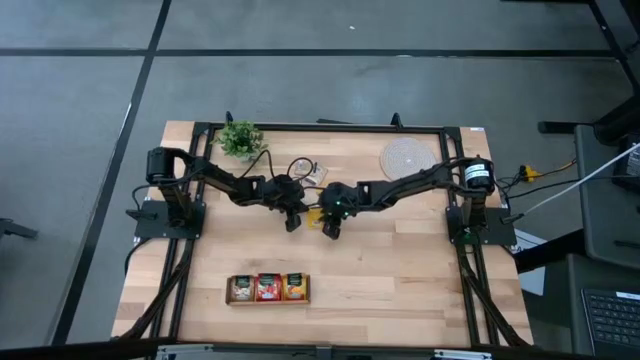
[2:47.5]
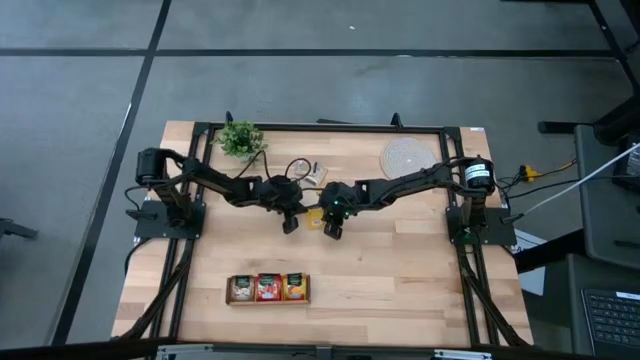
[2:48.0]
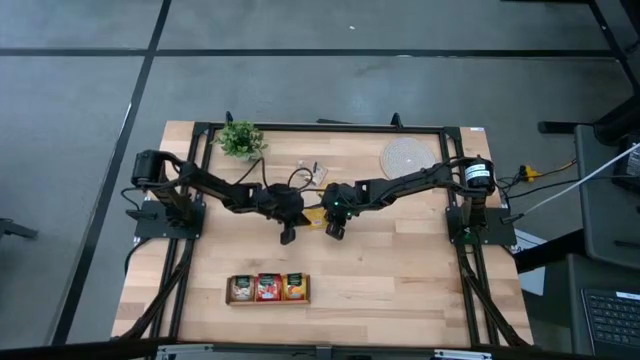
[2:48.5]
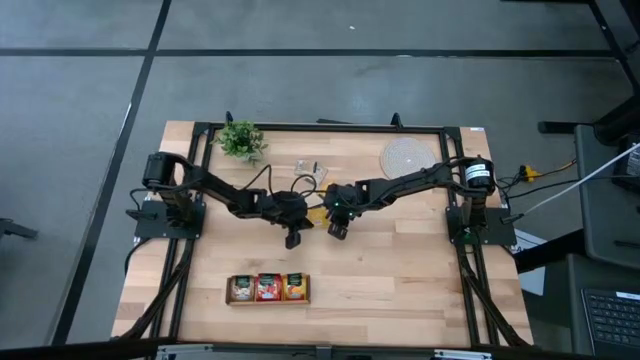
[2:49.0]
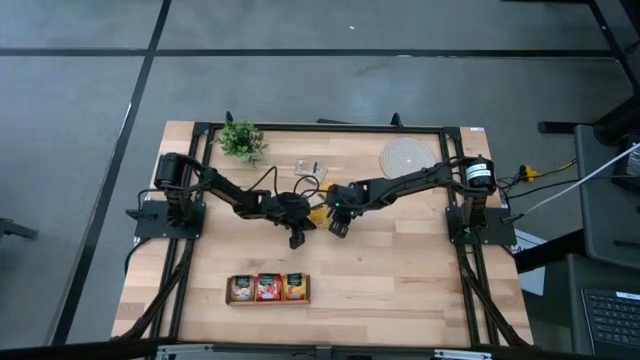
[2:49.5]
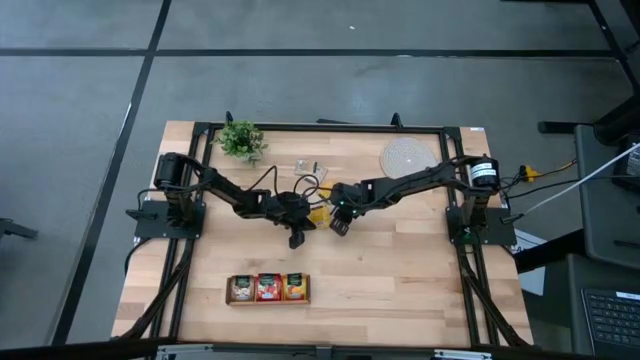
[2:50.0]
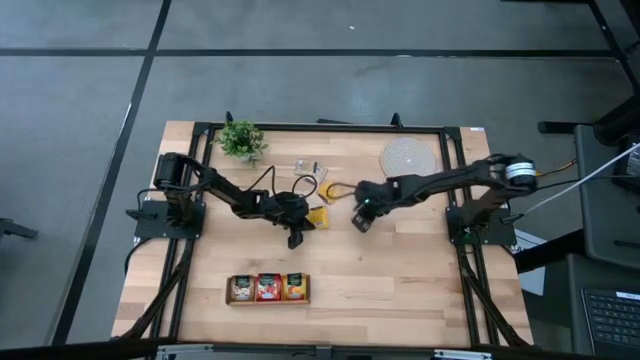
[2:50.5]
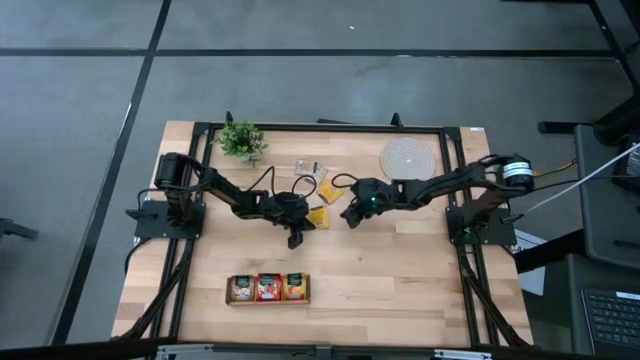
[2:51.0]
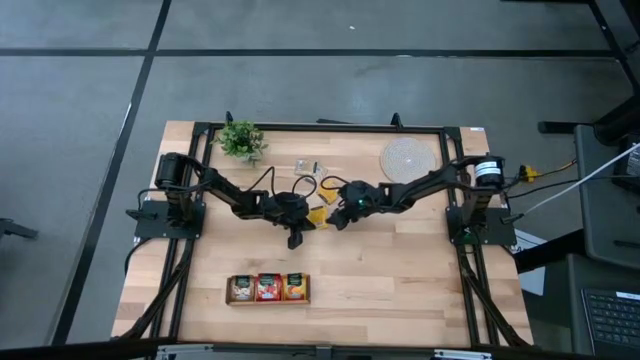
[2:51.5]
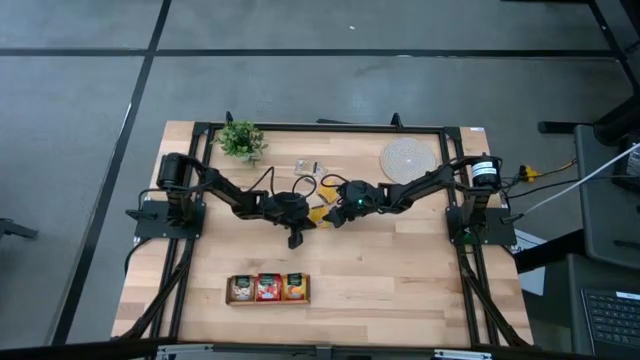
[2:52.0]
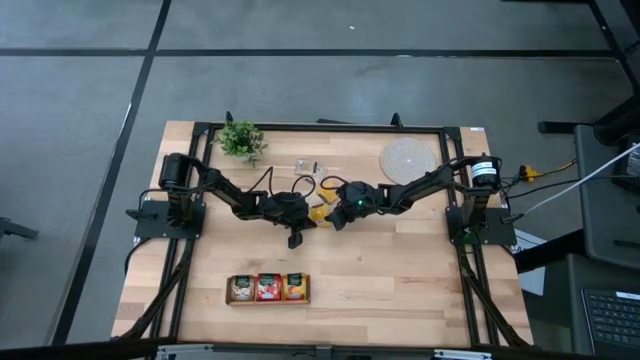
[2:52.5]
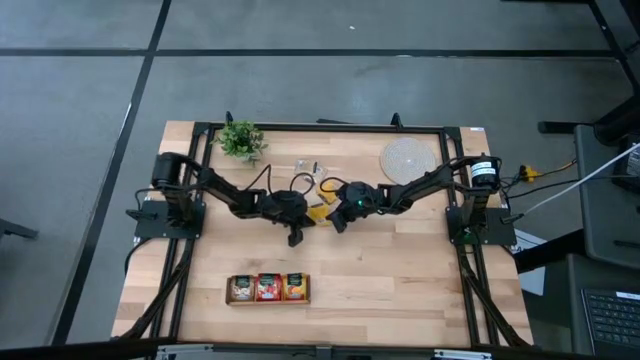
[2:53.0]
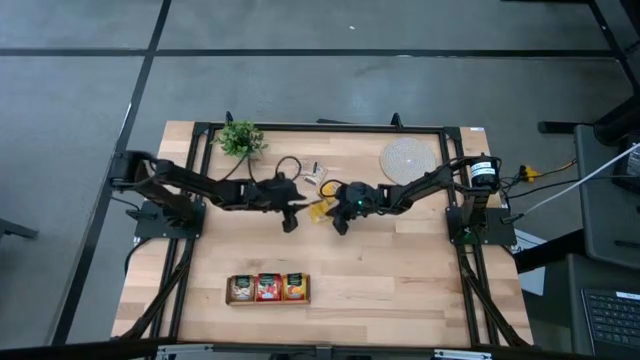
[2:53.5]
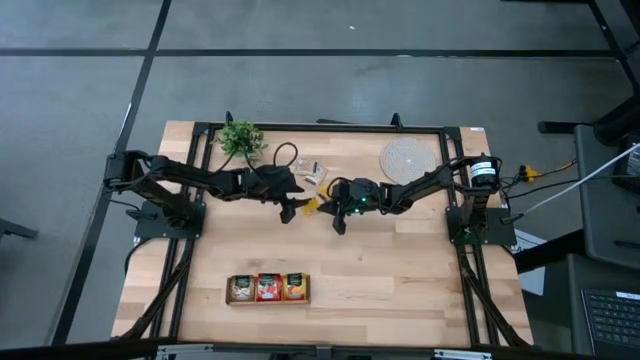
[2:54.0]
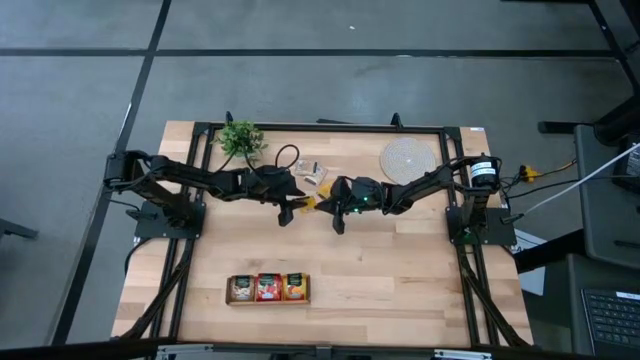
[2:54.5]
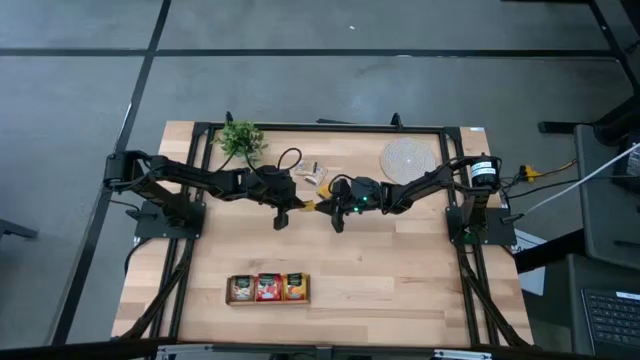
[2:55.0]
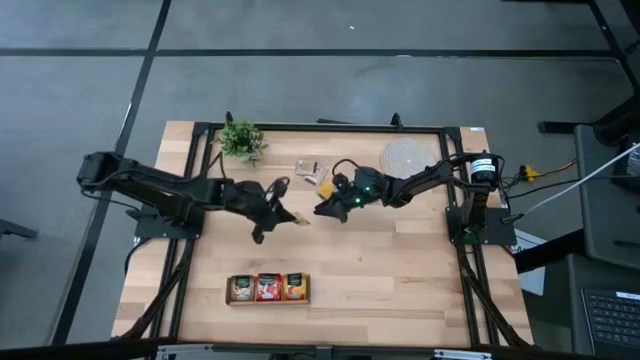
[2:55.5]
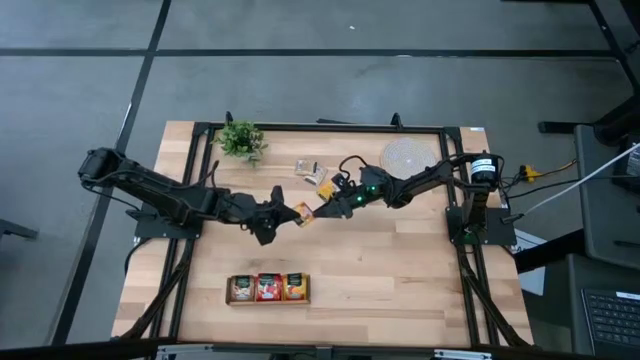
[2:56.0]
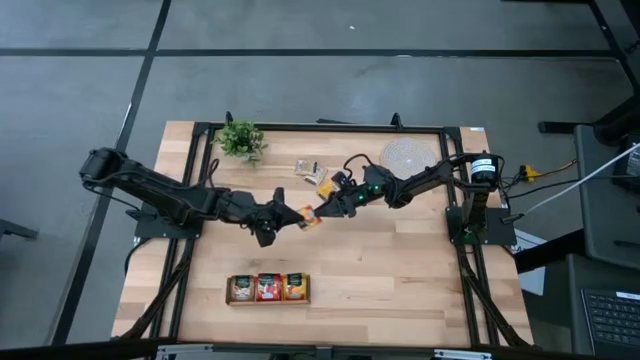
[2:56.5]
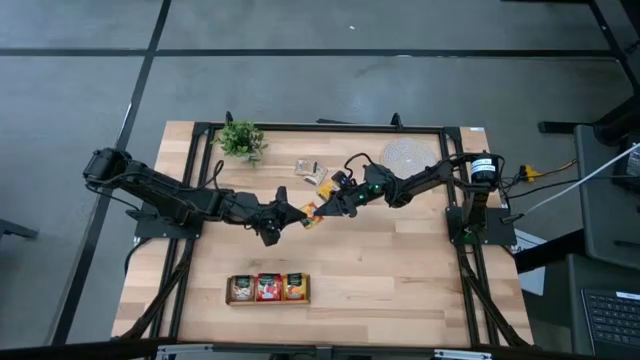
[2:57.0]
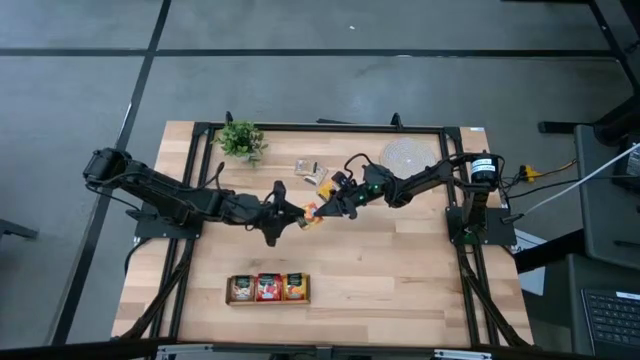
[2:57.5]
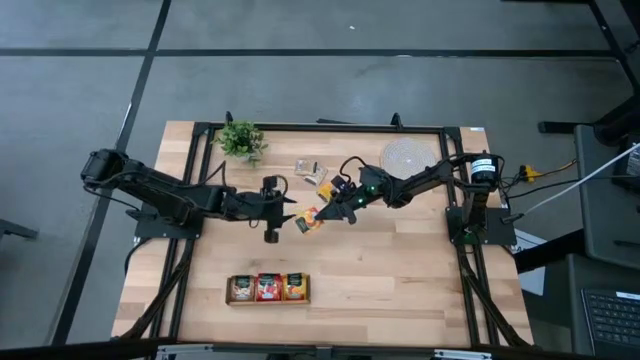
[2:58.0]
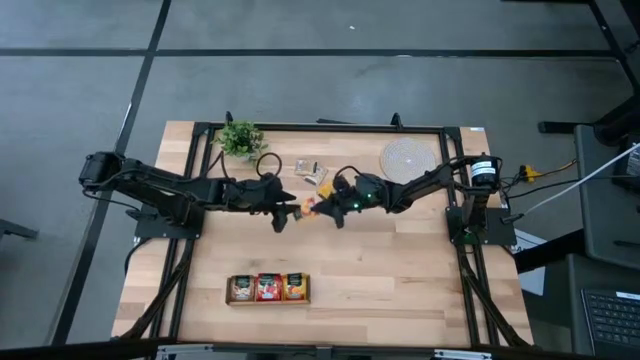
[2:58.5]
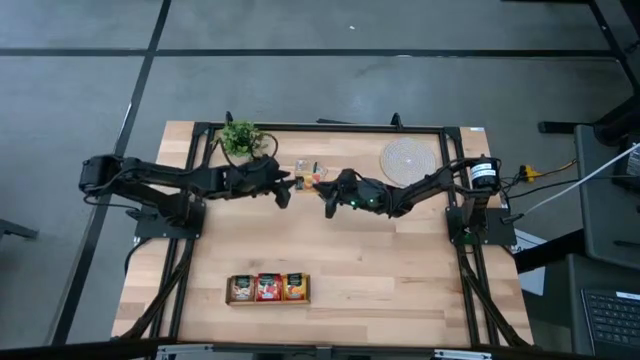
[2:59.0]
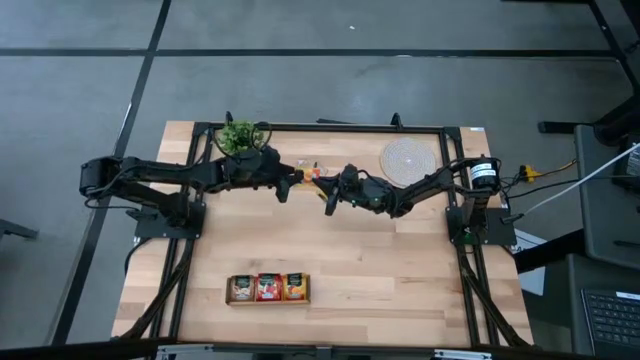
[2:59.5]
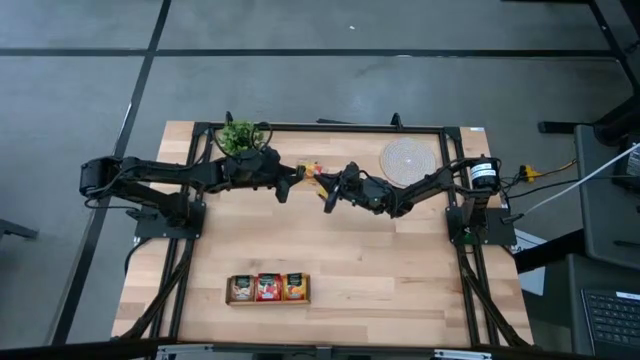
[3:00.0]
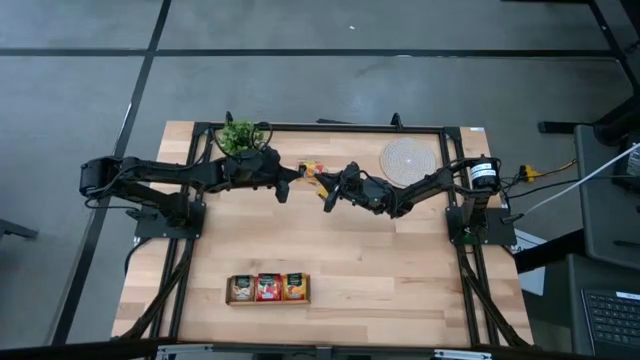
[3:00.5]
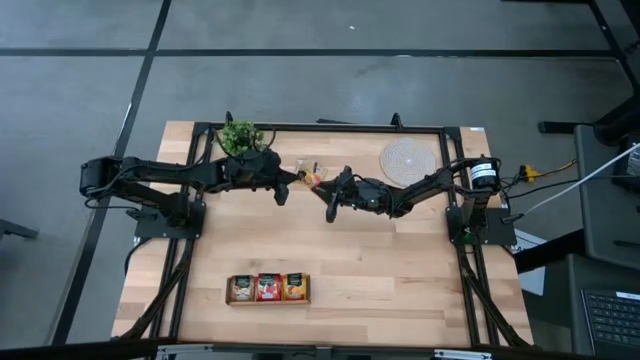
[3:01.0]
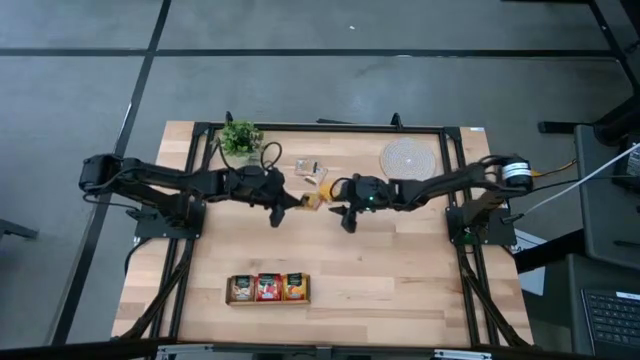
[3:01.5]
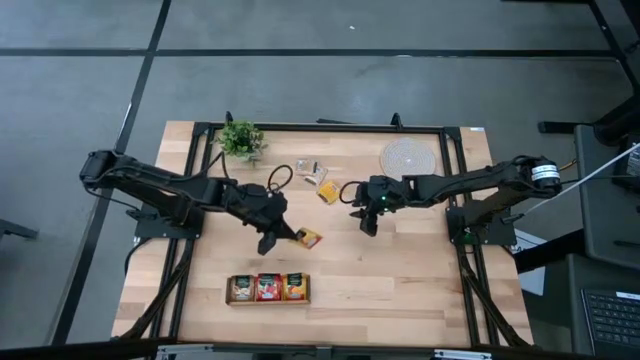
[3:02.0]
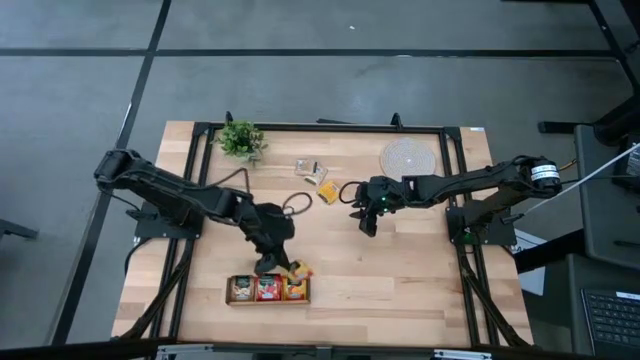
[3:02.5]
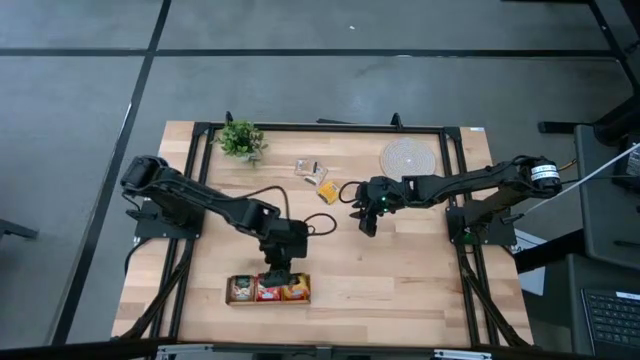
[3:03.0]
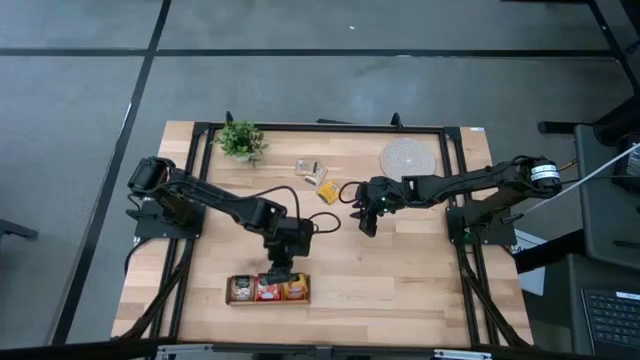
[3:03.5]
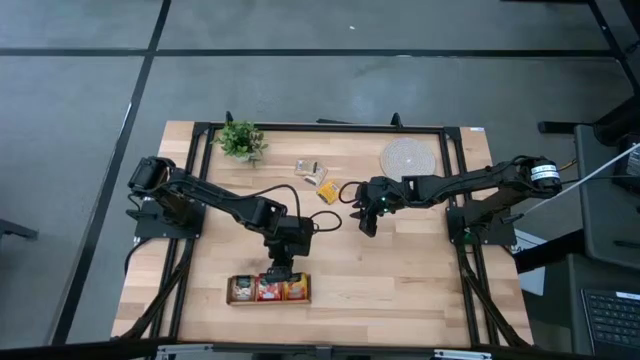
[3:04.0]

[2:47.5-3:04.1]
Task: Pick & Place Tea
Put the yellow tea bag into the right section of the wooden organizer

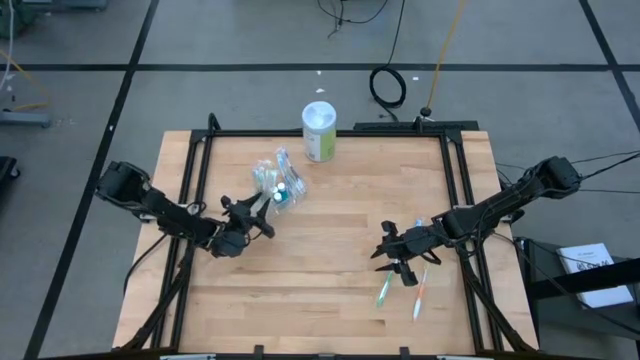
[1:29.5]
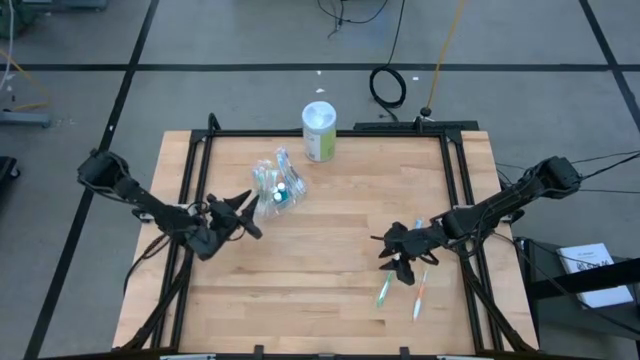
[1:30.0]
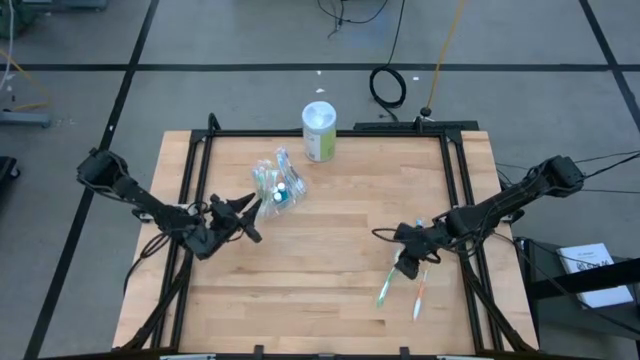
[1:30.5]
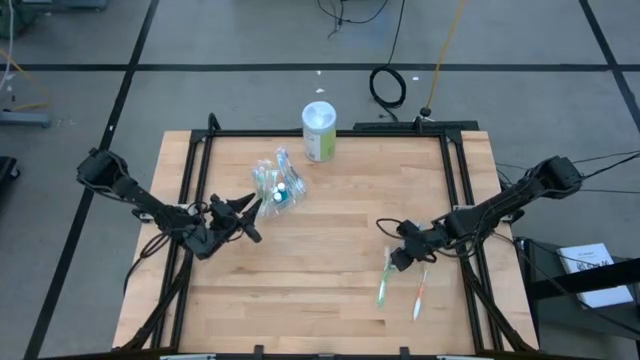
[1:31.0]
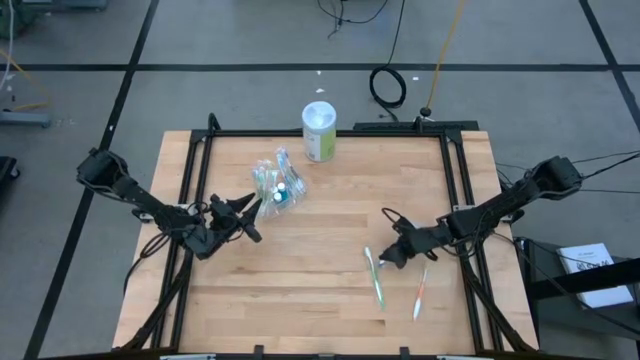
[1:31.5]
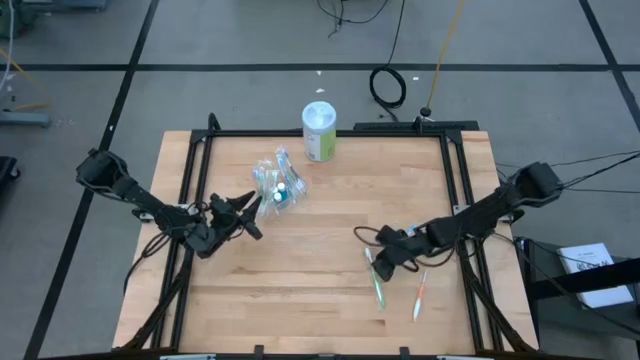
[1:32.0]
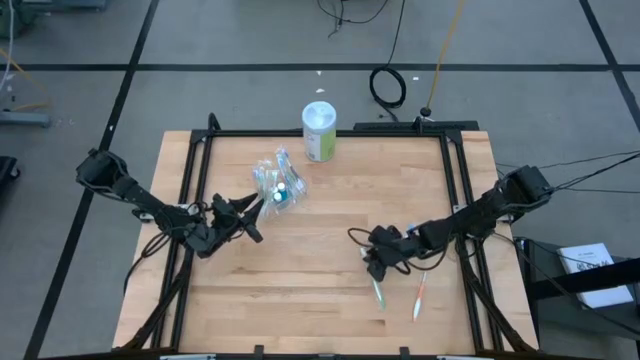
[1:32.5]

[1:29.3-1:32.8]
Task: Pick & Place toothbrushing station
Put the green toothbrush into the transparent organizer
